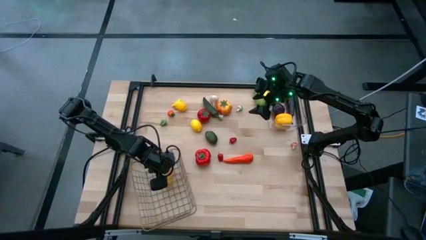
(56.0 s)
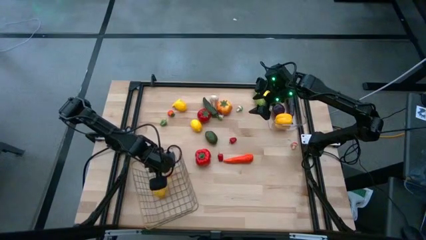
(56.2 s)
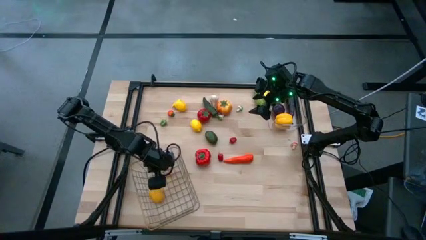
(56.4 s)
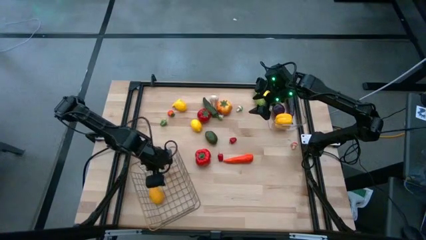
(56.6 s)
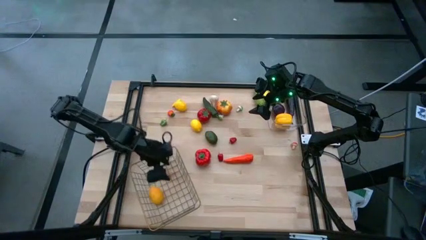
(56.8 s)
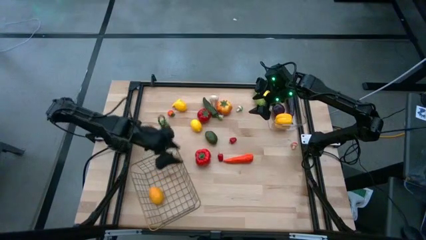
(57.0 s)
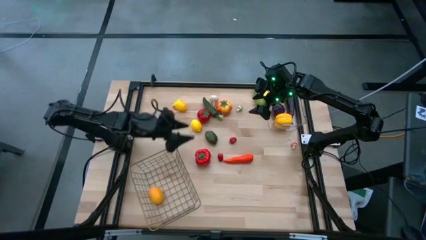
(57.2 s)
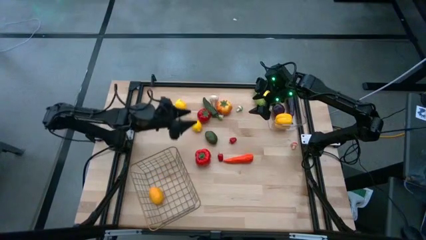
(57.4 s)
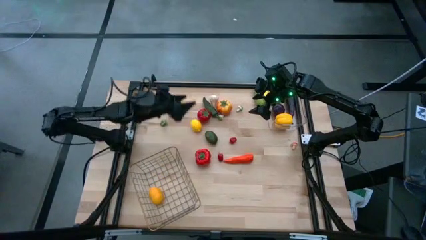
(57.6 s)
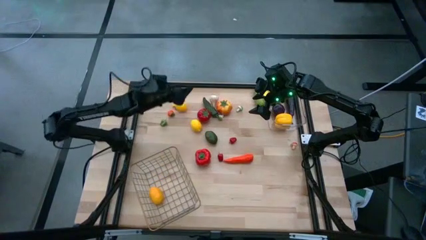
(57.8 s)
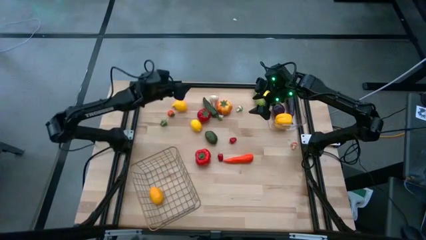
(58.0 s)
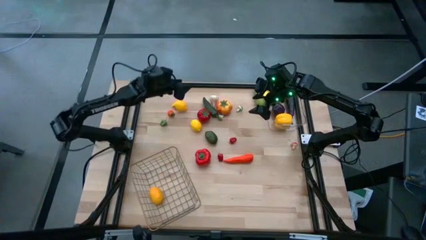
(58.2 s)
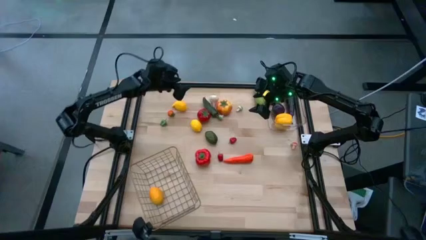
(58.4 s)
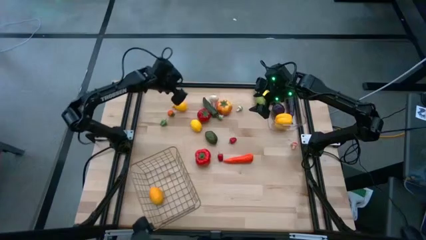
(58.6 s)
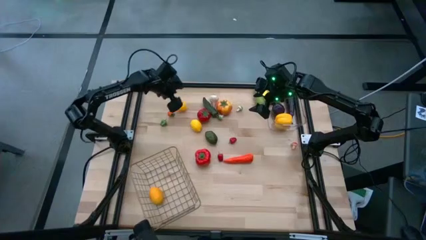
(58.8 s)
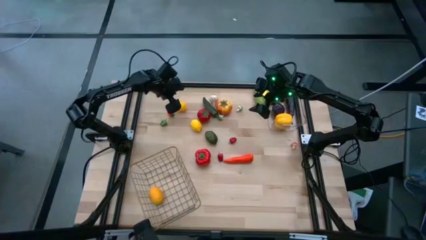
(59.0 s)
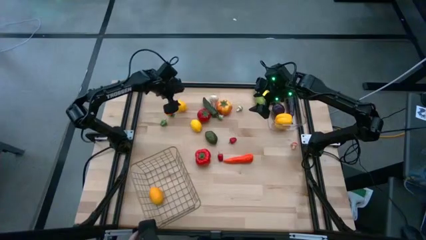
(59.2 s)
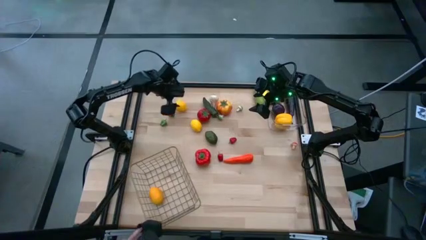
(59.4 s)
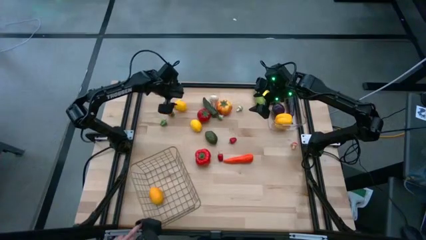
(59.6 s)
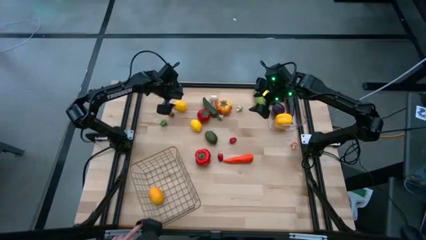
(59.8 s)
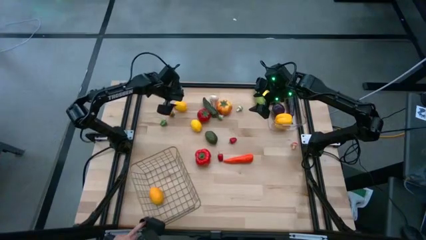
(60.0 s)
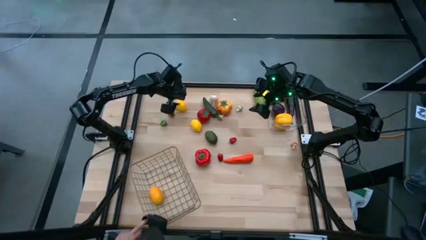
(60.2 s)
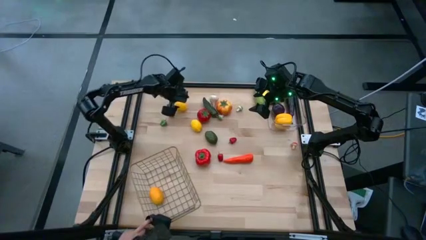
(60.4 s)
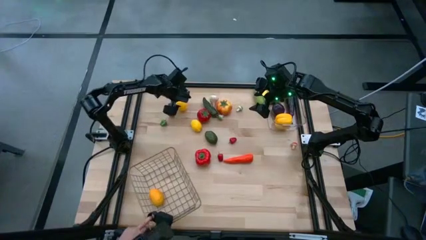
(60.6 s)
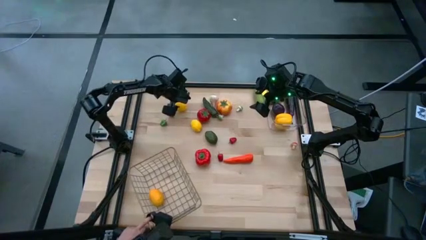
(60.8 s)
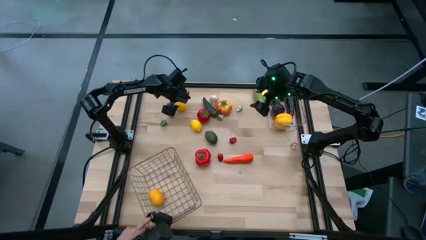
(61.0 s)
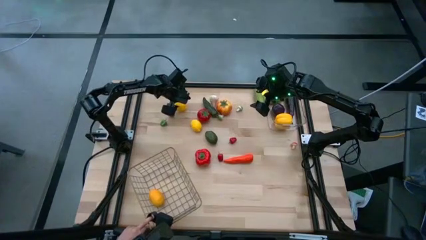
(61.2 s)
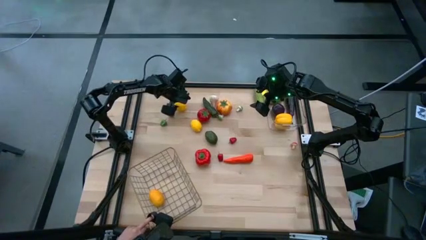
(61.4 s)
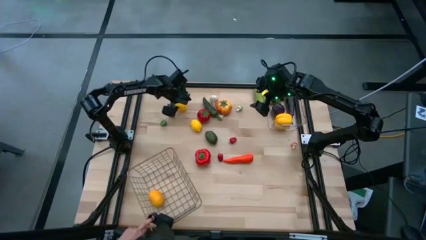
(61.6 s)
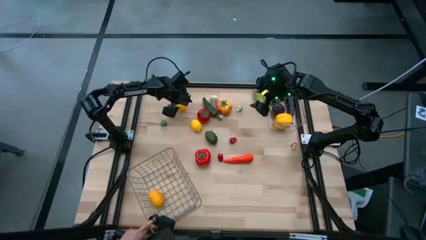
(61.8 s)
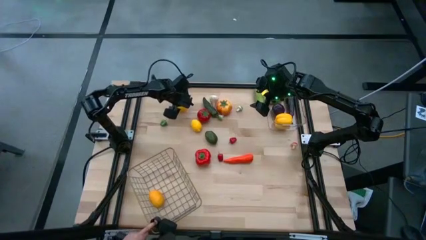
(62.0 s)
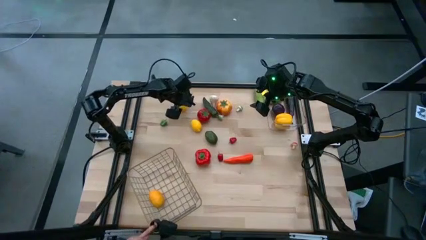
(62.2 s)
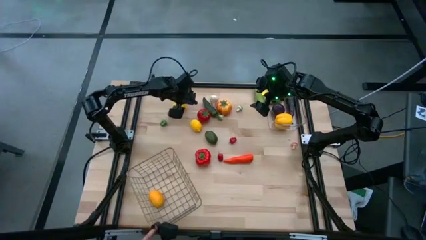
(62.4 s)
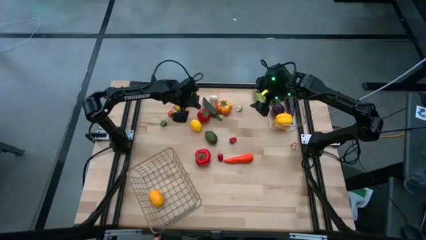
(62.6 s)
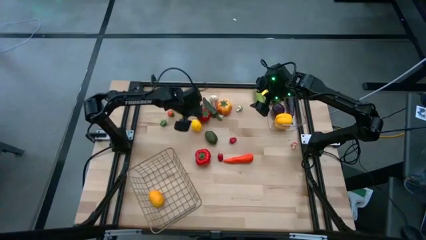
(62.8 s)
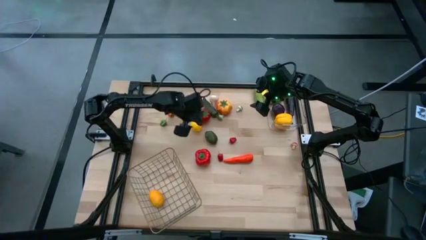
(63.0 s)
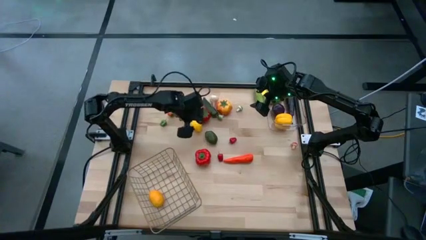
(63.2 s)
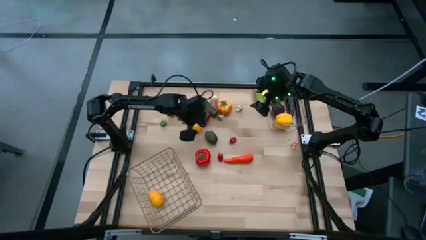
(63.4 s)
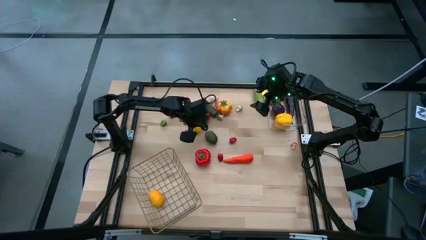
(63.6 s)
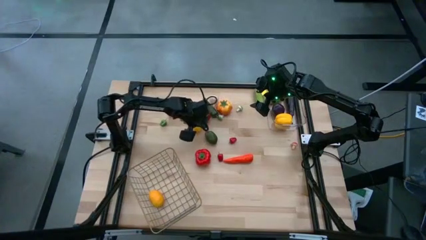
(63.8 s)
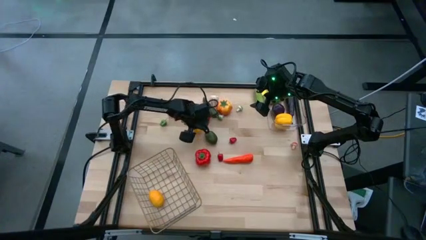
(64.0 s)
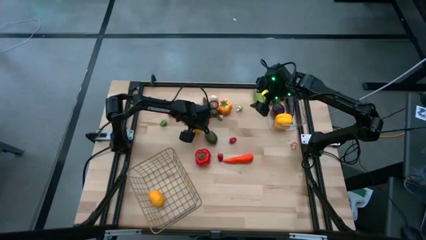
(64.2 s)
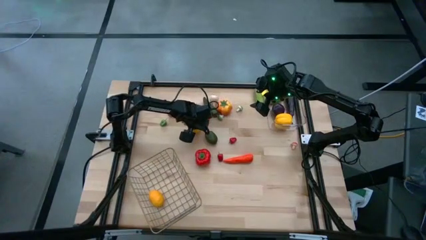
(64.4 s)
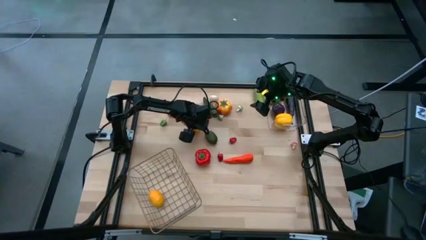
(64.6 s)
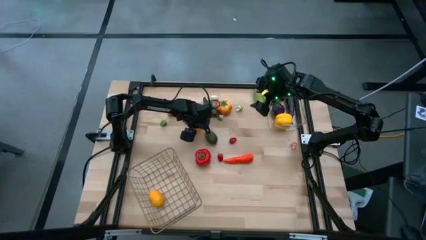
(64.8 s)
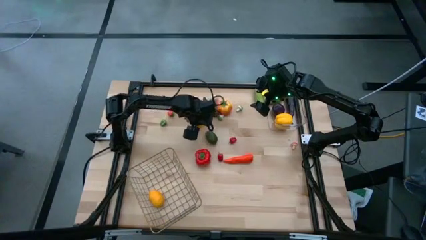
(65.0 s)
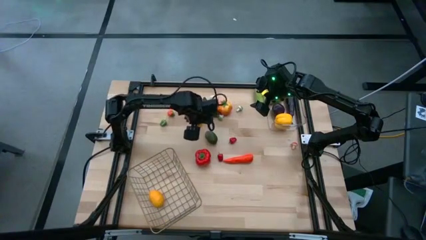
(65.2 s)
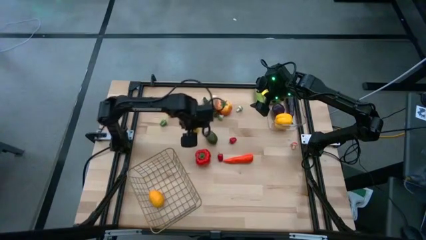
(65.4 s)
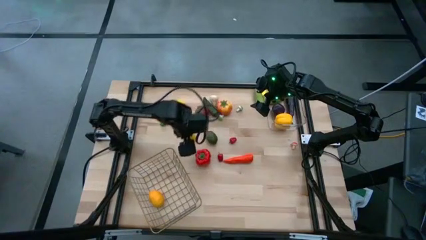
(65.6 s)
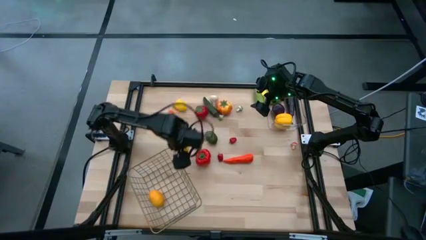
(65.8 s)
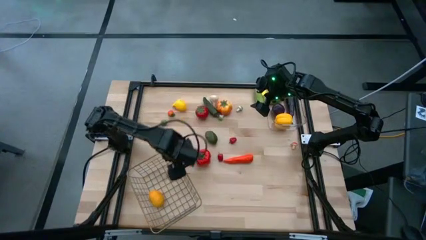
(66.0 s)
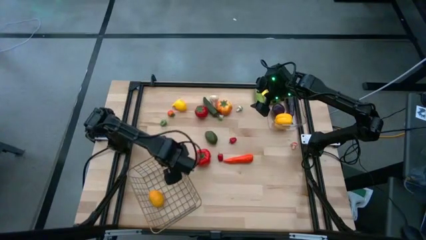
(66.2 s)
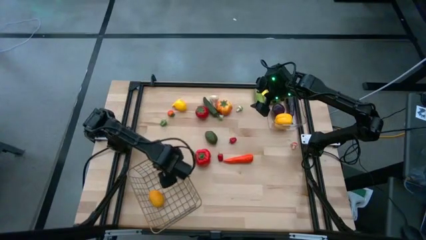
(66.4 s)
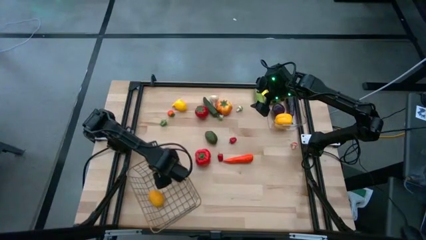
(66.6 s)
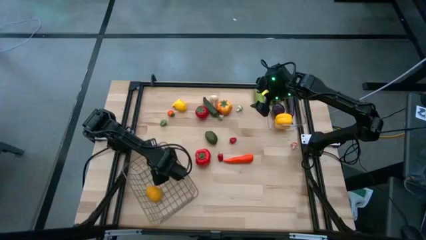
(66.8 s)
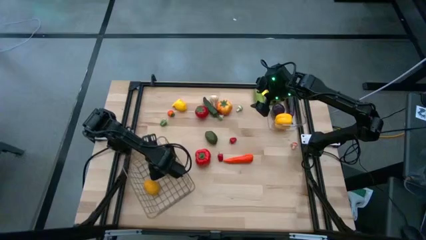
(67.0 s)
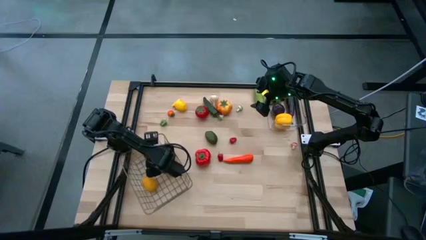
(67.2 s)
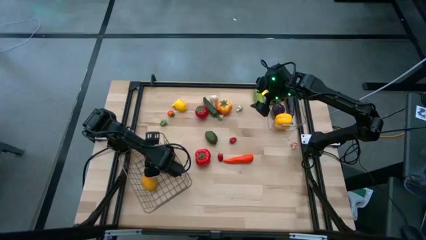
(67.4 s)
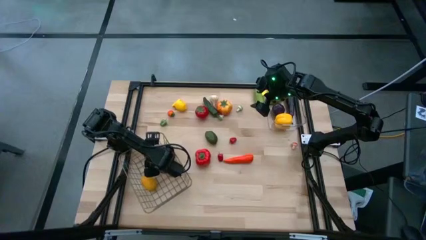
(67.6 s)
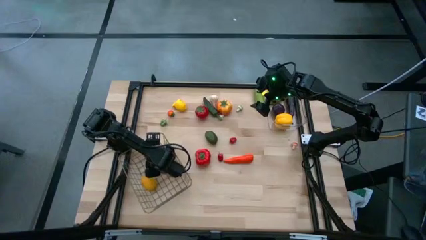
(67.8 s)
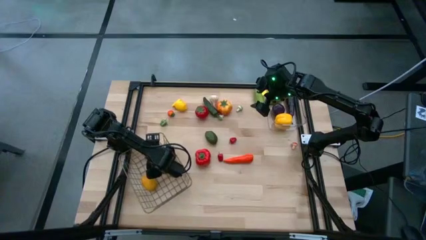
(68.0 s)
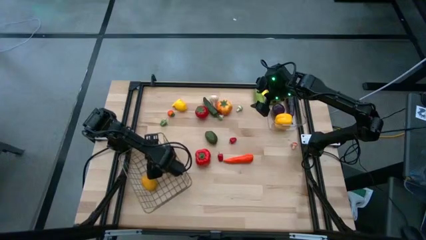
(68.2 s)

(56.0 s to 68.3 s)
Task: Sort produce into baskets
Put the bottom yellow lemon into the wire basket

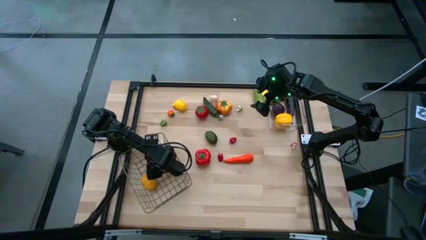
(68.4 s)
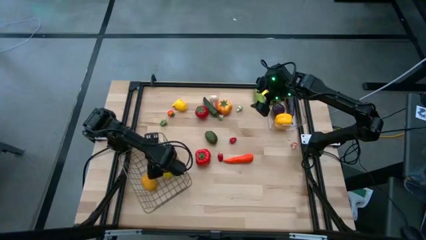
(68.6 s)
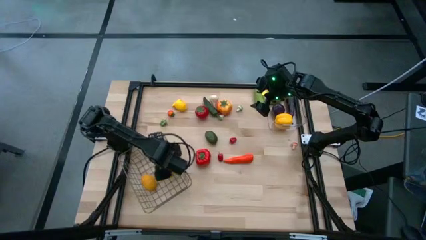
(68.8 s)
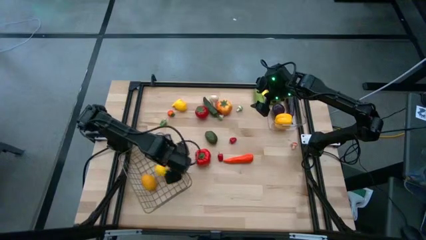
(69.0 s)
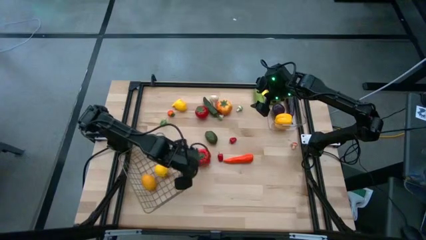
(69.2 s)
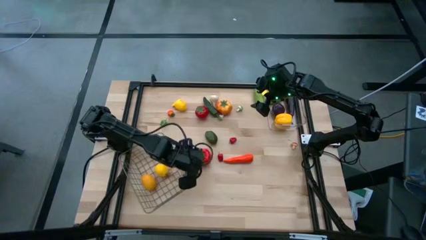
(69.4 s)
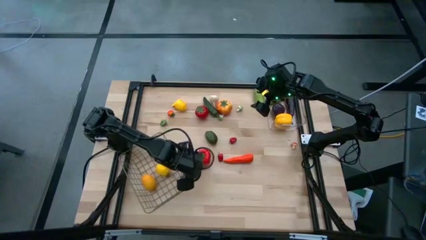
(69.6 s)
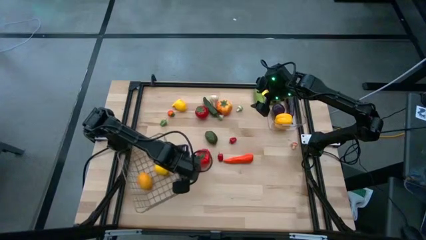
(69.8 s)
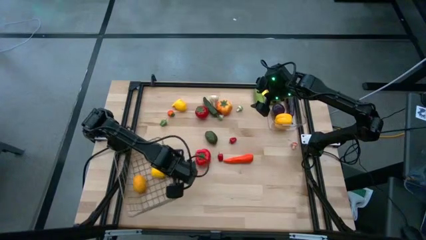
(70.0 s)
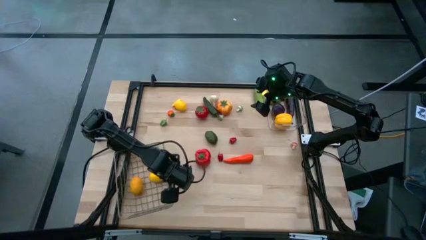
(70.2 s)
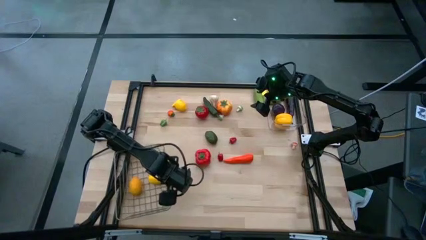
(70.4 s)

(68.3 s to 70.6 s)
Adjust the wire basket
